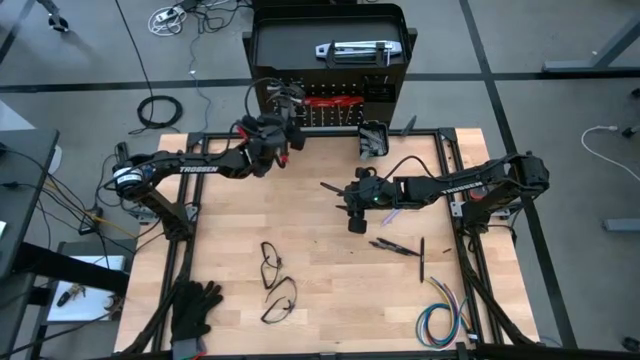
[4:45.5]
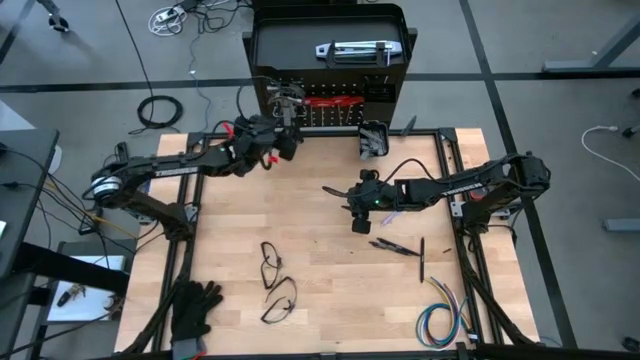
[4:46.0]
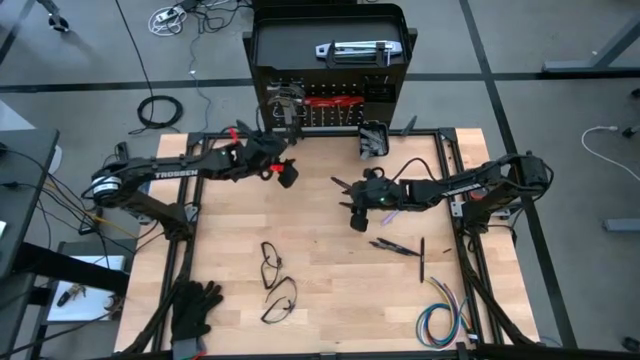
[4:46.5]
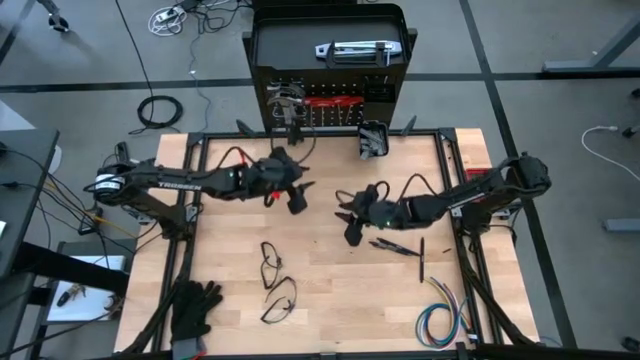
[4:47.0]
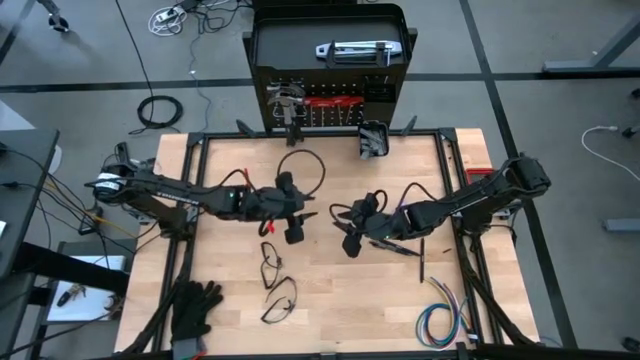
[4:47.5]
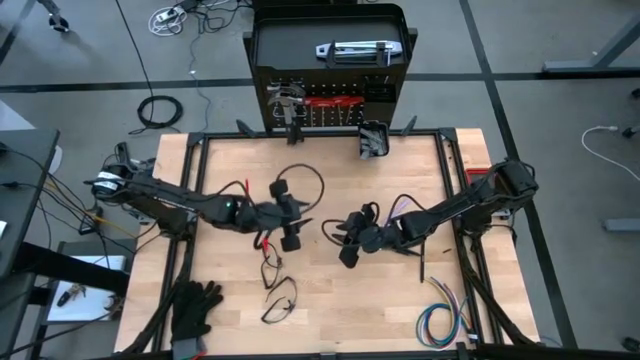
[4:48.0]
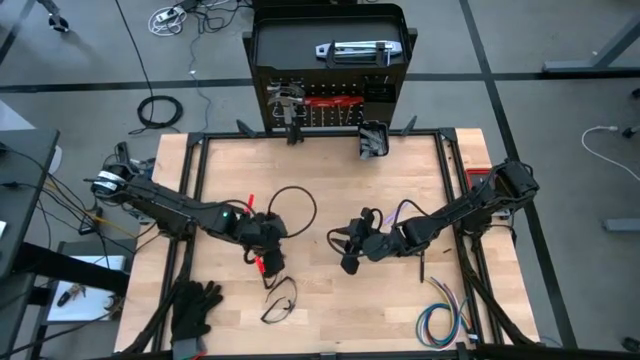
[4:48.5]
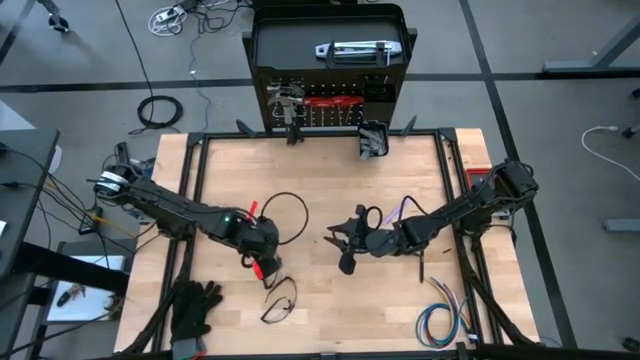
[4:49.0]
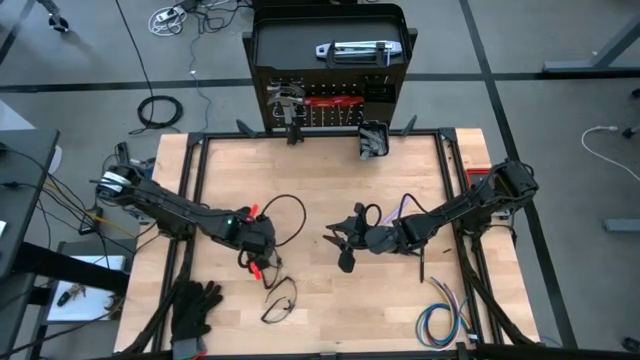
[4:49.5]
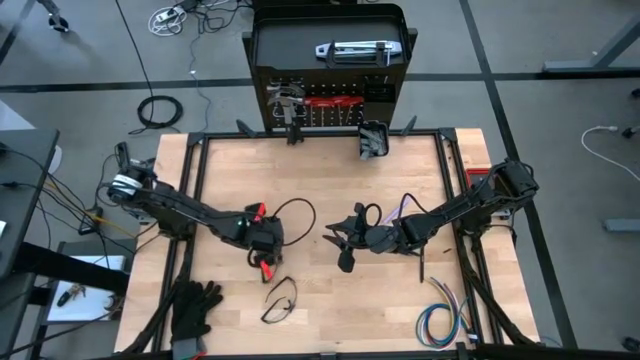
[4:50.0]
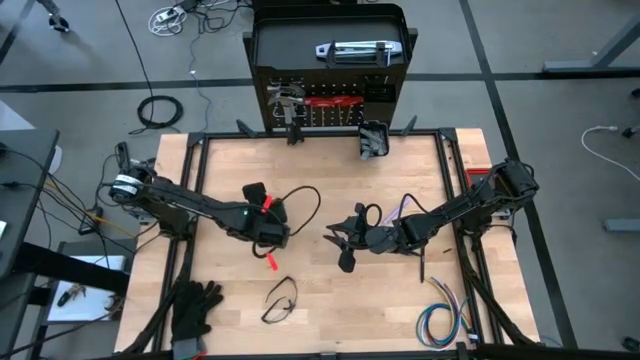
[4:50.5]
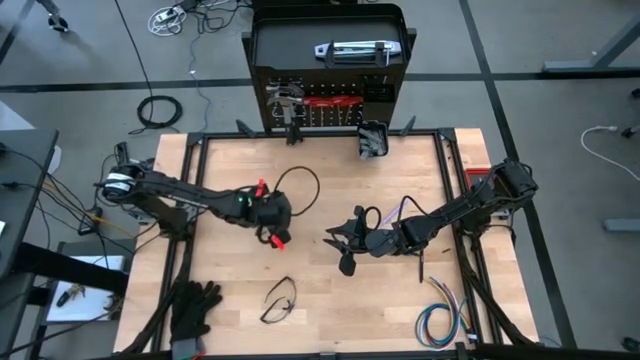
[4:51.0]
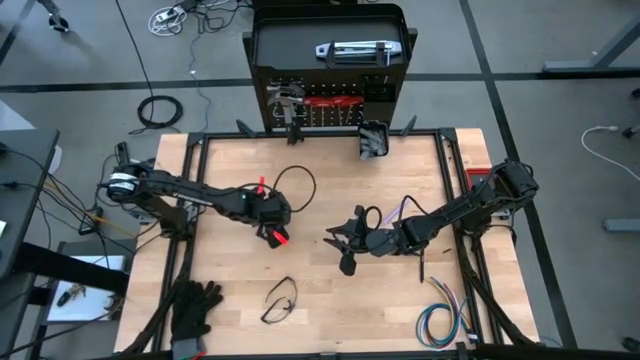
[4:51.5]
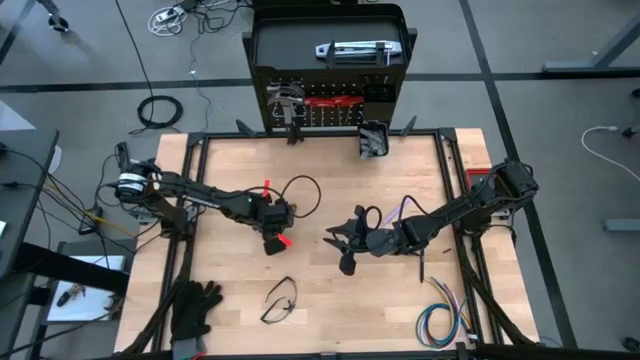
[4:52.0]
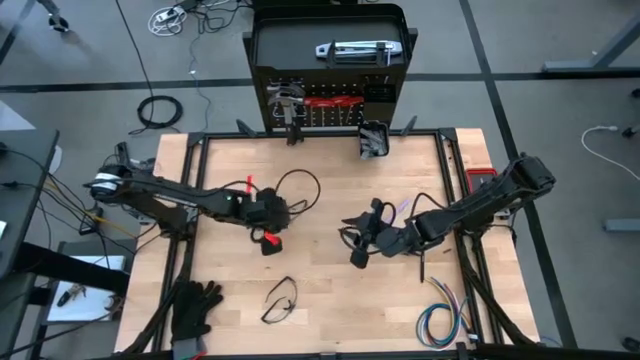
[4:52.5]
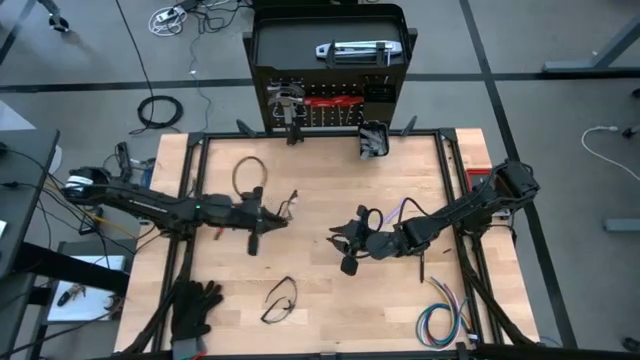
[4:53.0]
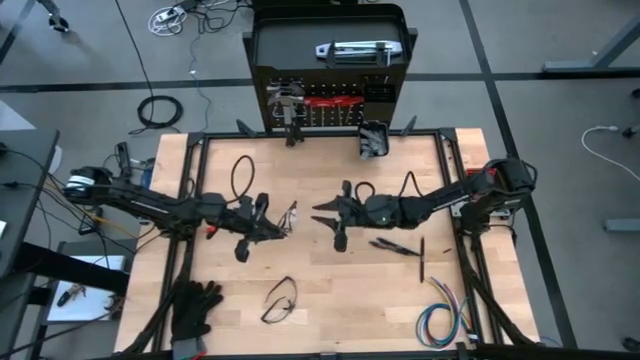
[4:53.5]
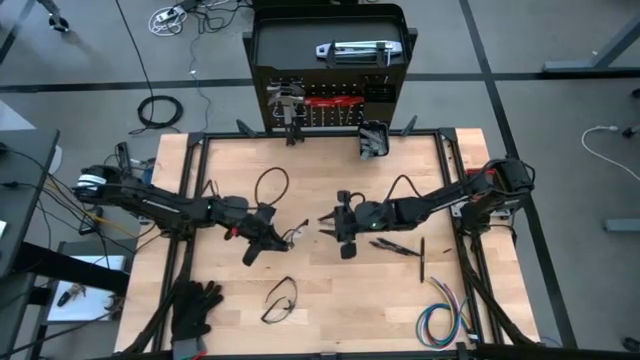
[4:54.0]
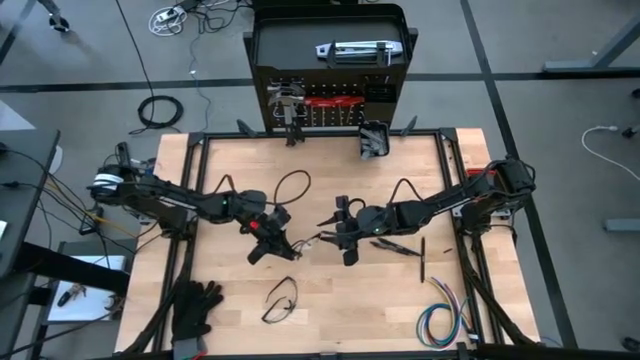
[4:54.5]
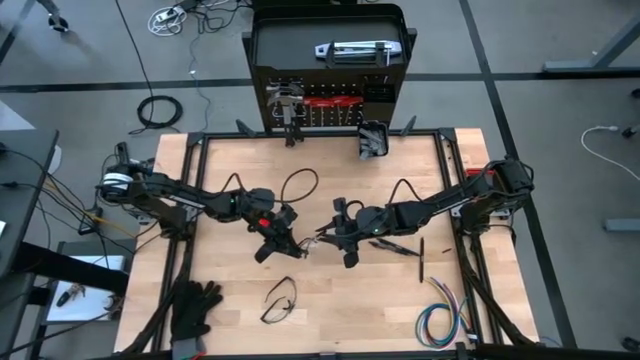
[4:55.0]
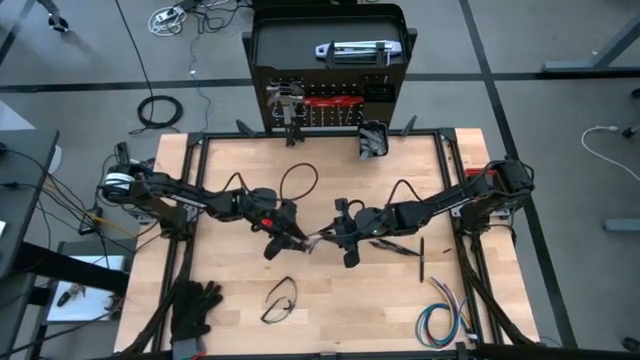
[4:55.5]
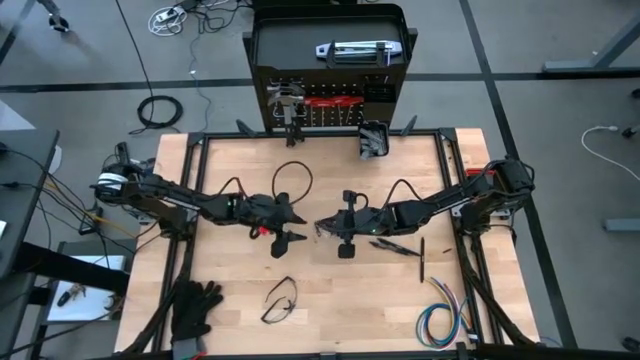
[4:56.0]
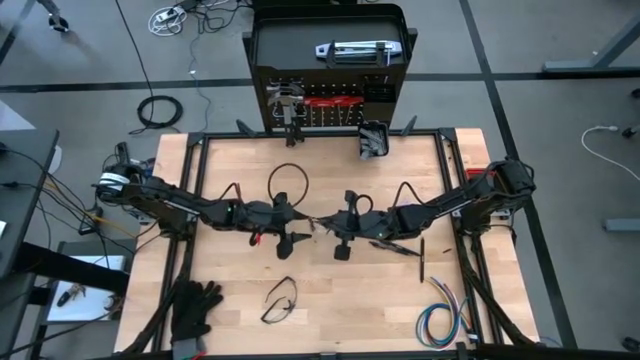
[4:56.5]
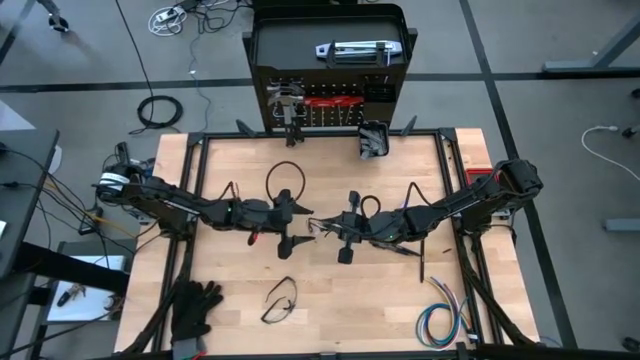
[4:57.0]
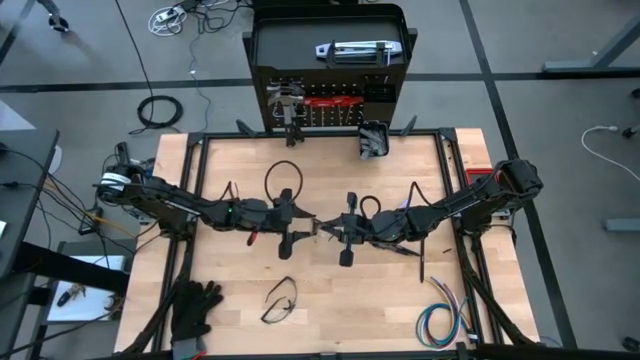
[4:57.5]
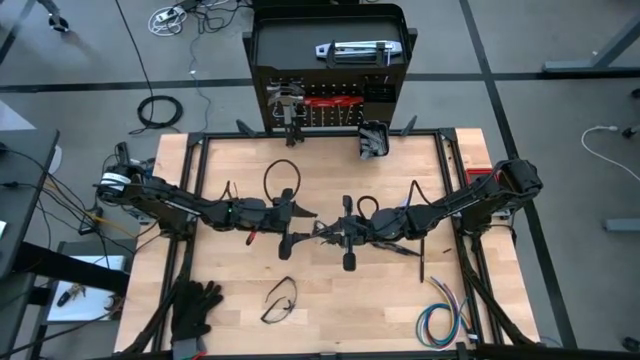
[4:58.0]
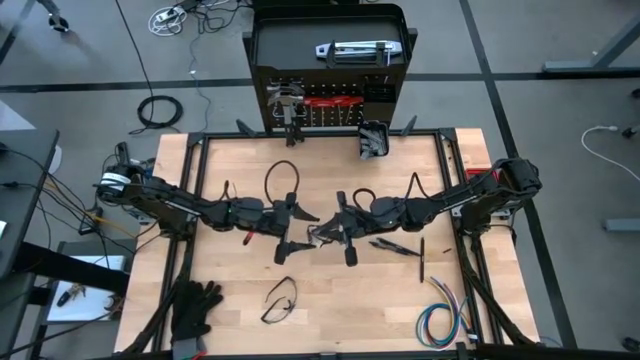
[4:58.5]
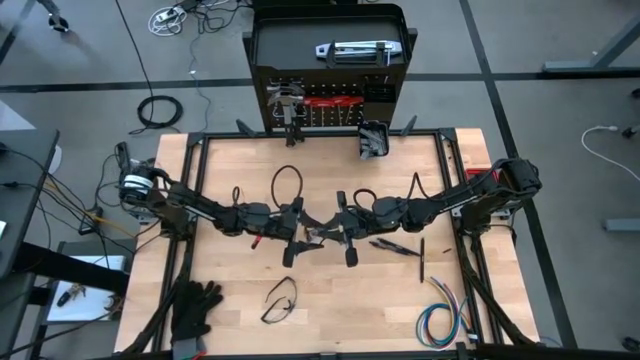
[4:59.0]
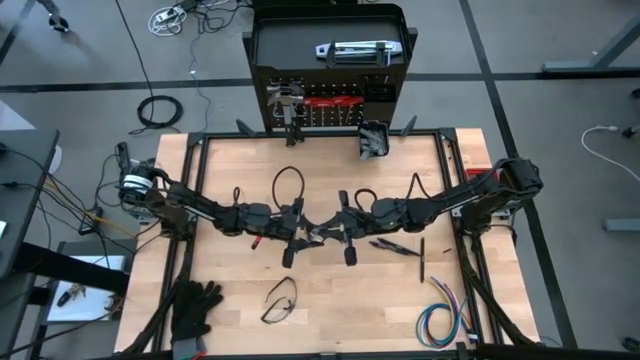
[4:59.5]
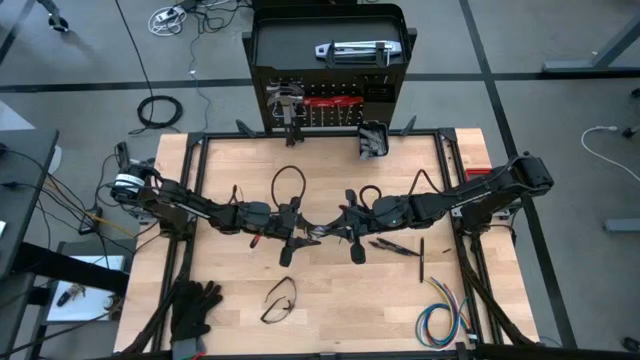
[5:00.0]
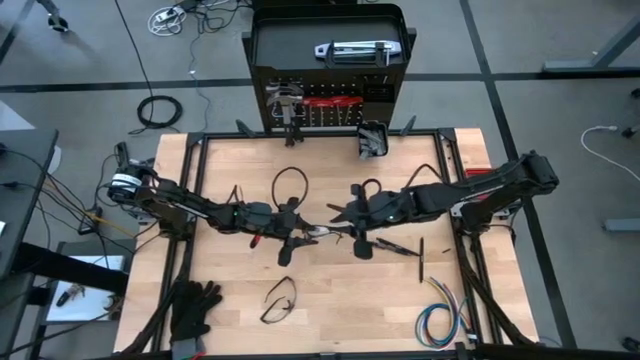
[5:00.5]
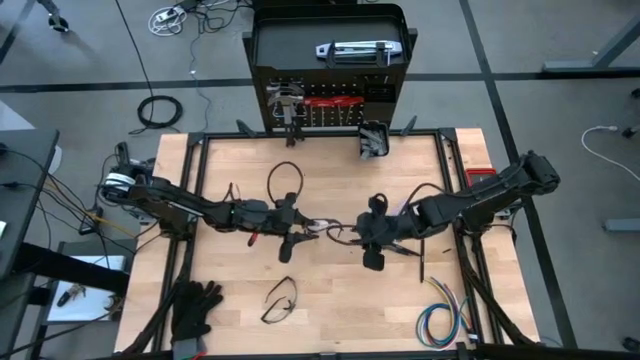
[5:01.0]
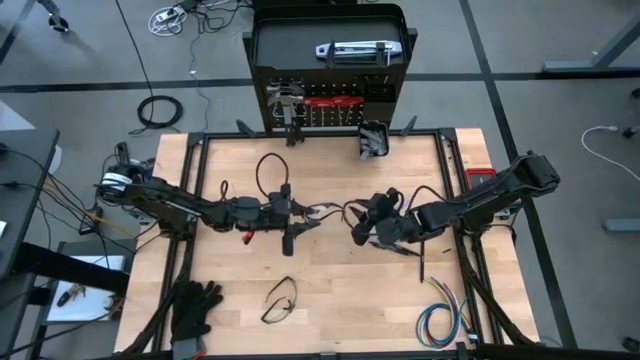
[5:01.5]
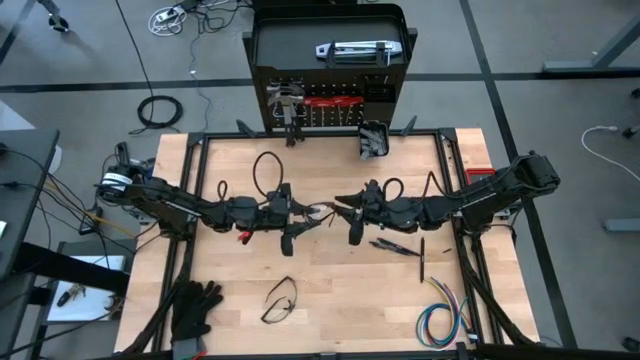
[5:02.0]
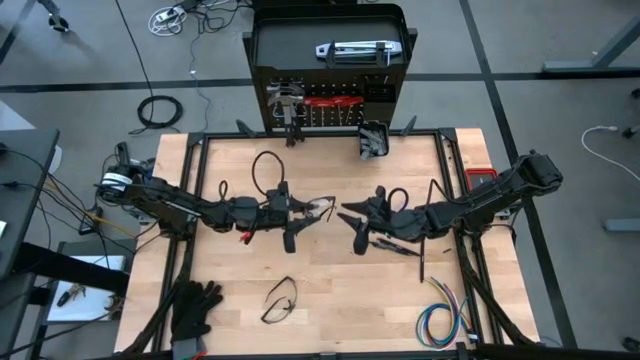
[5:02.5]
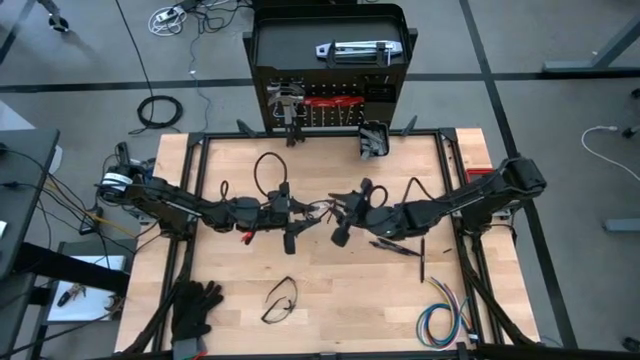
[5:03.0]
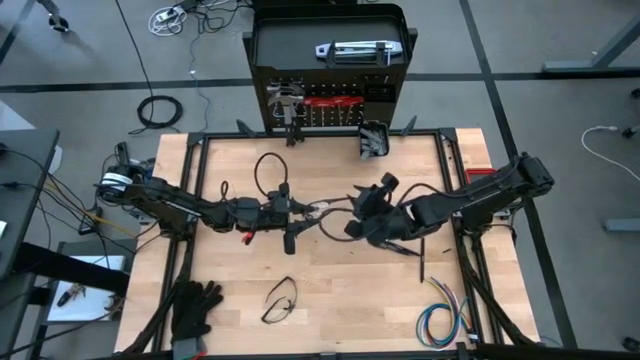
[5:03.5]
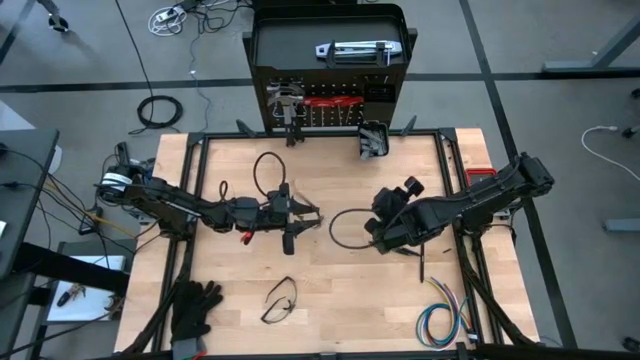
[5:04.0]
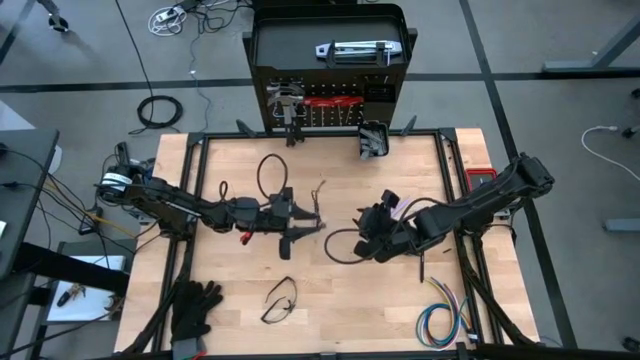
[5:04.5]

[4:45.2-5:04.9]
Task: Hang tools onto peg board
Hang the top glasses on the pegboard

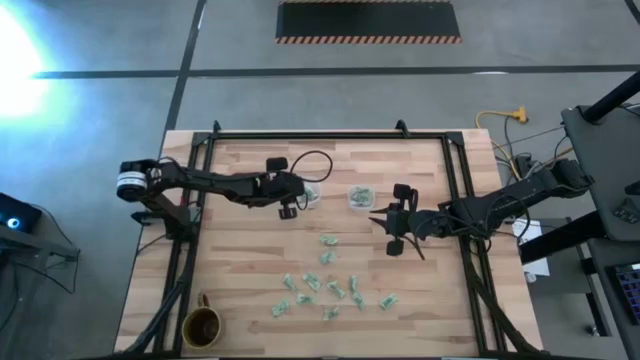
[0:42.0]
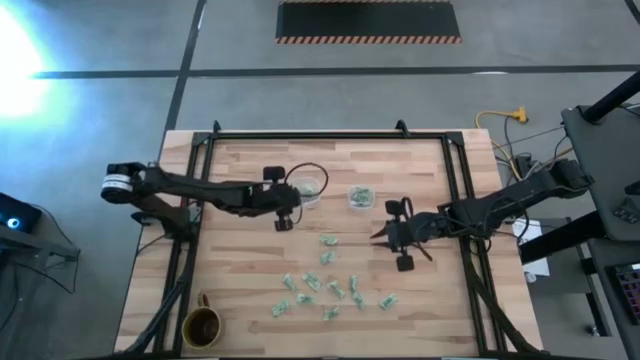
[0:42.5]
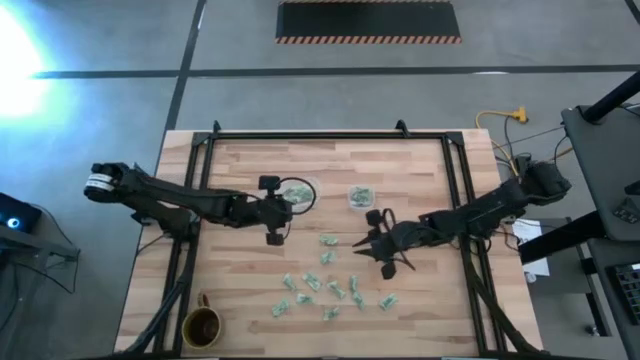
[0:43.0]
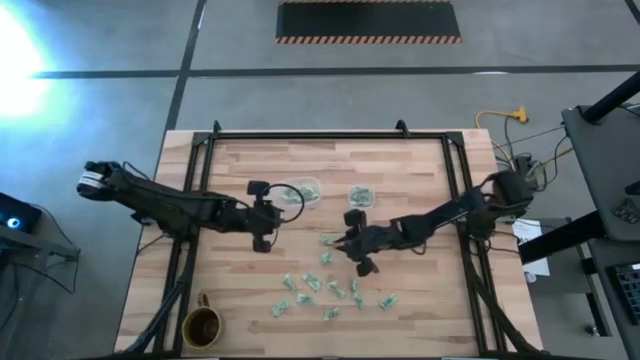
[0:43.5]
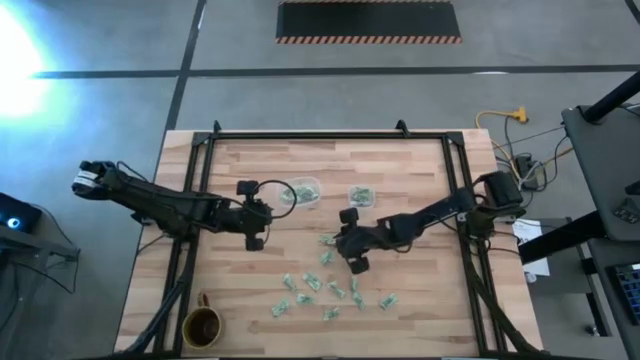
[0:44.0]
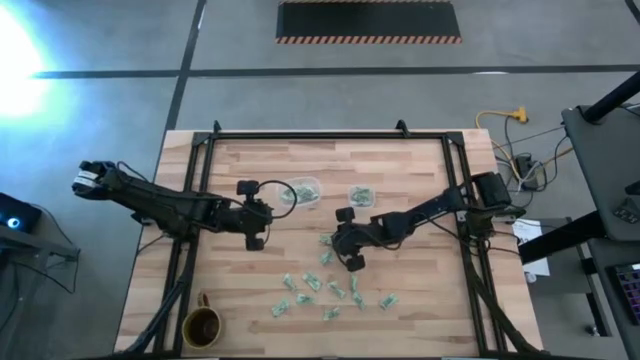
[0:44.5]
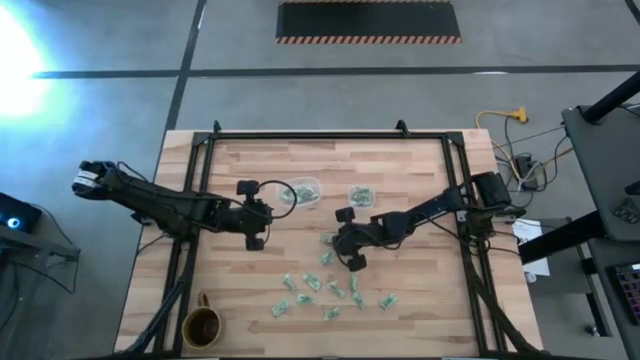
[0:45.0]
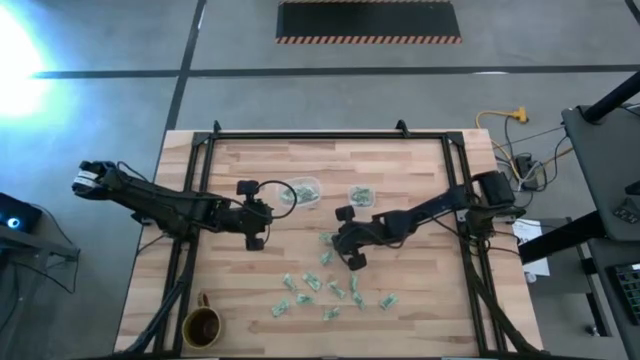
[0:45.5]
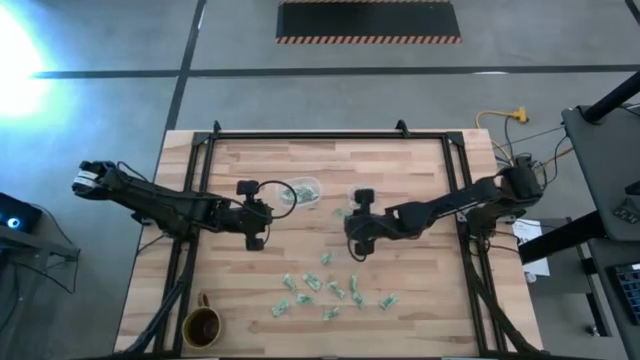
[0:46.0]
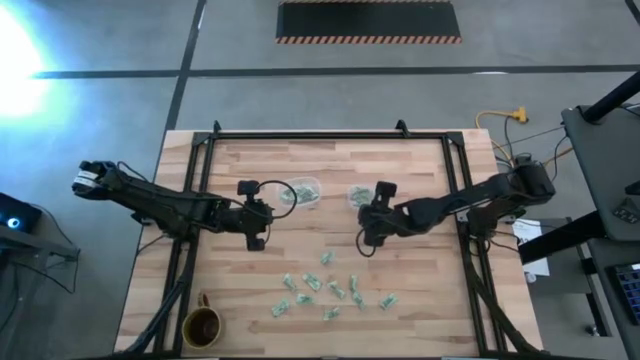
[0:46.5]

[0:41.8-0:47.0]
Task: Pick and place Stevia / Truvia into bins
Put the stevia packet into the transparent square container
